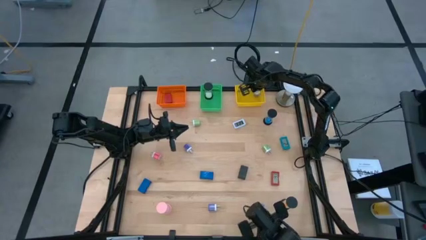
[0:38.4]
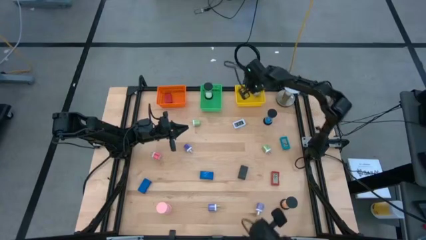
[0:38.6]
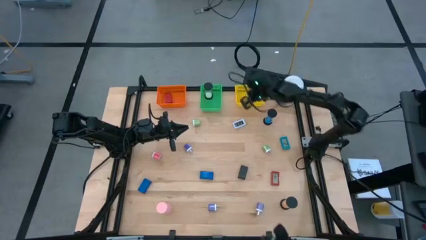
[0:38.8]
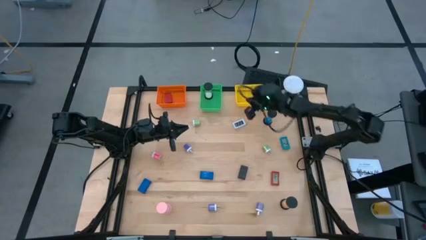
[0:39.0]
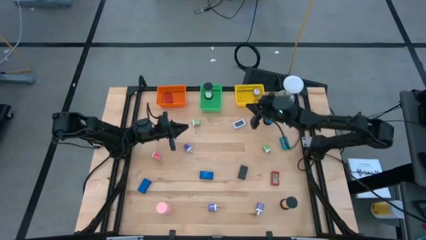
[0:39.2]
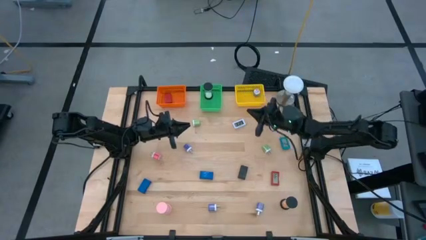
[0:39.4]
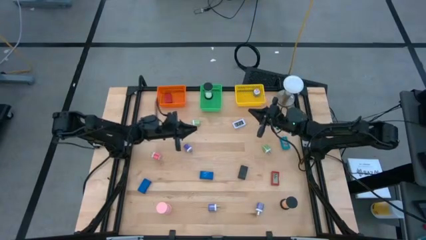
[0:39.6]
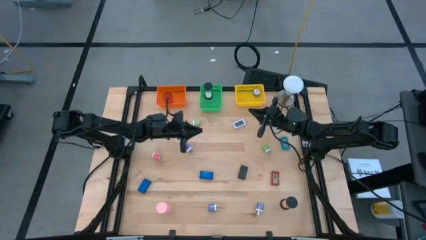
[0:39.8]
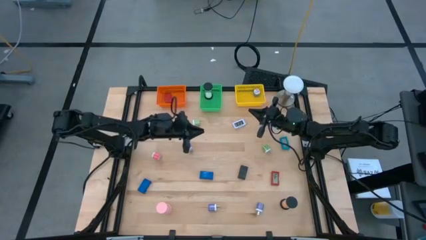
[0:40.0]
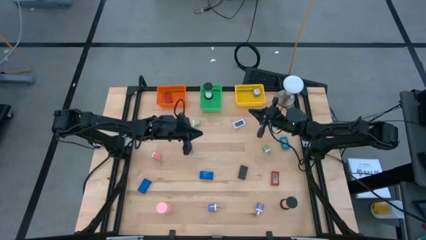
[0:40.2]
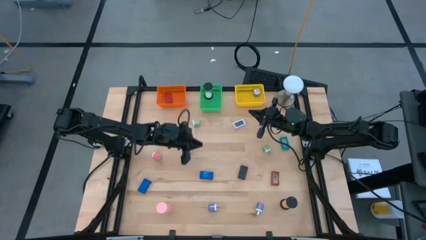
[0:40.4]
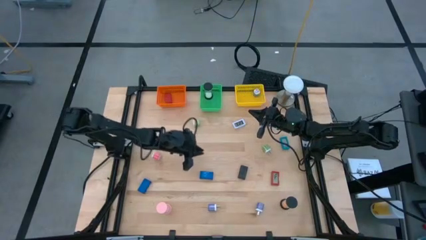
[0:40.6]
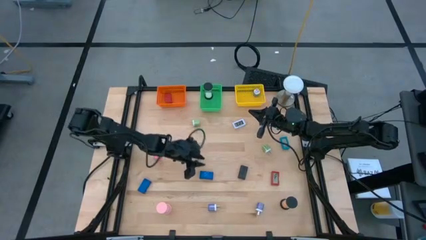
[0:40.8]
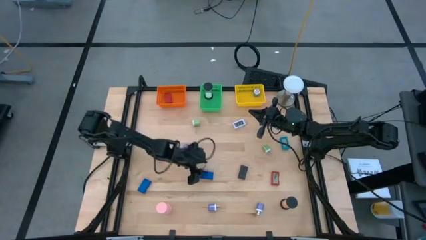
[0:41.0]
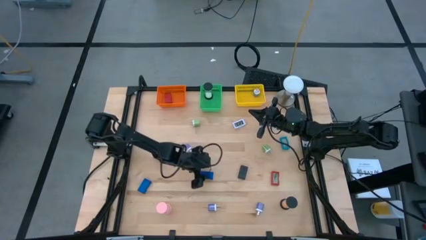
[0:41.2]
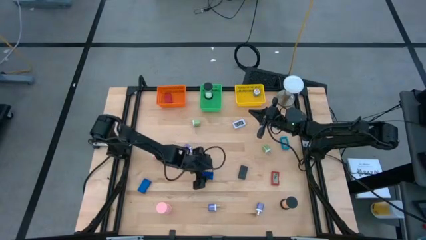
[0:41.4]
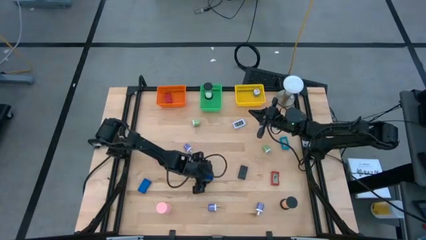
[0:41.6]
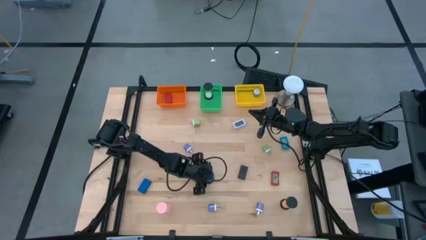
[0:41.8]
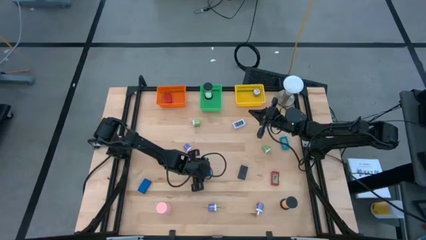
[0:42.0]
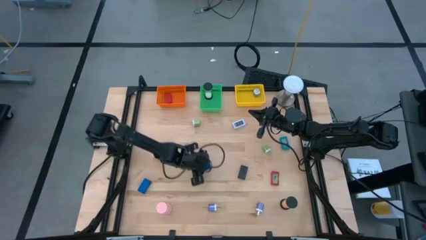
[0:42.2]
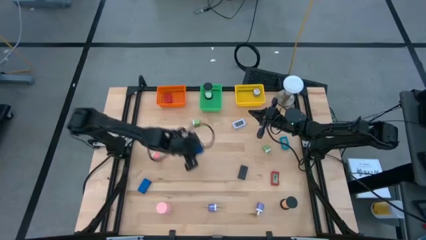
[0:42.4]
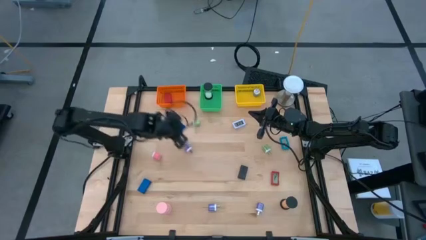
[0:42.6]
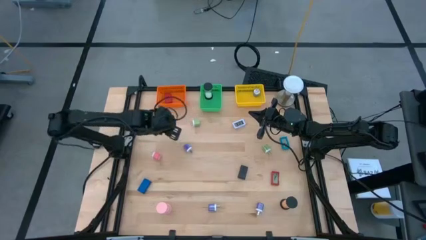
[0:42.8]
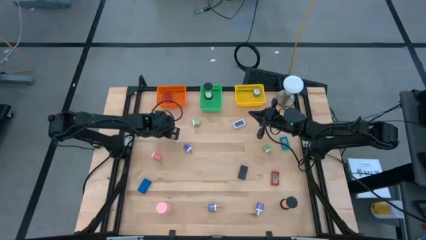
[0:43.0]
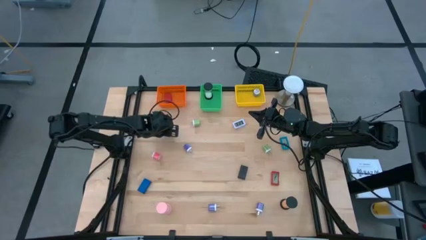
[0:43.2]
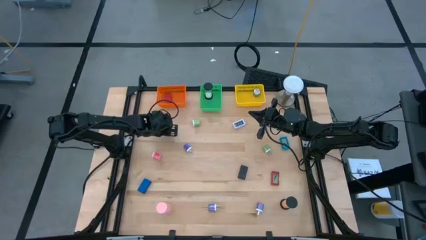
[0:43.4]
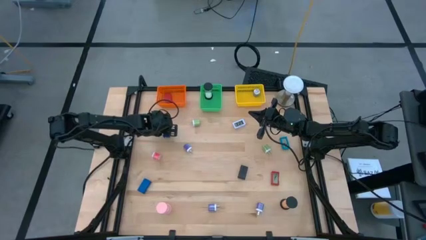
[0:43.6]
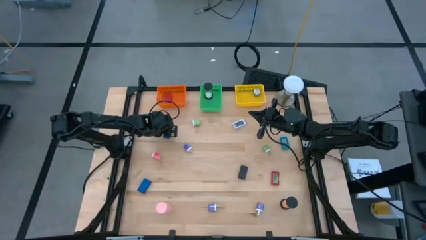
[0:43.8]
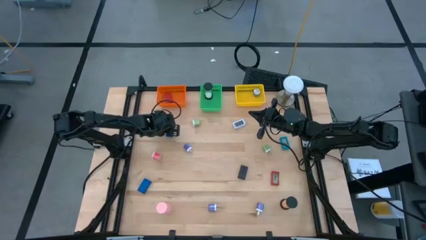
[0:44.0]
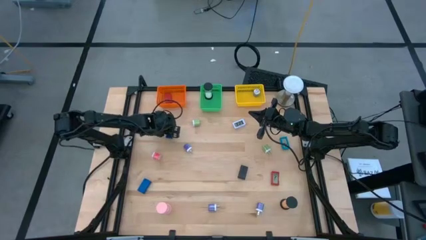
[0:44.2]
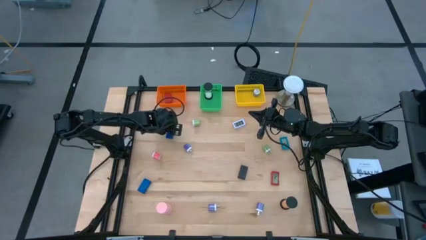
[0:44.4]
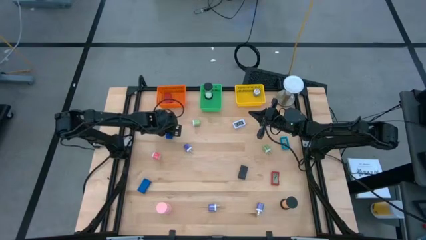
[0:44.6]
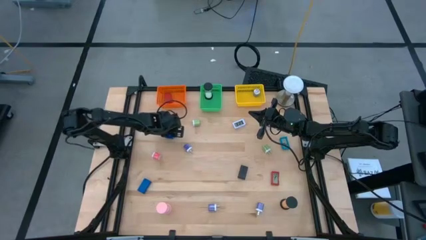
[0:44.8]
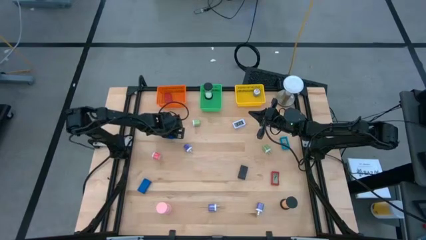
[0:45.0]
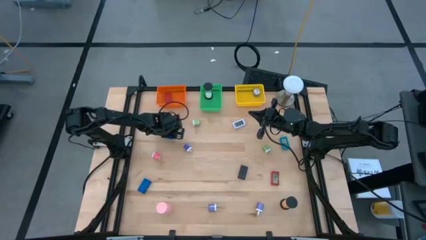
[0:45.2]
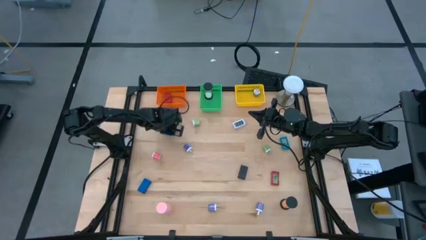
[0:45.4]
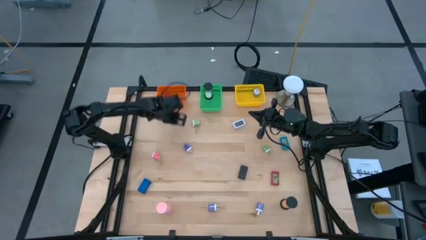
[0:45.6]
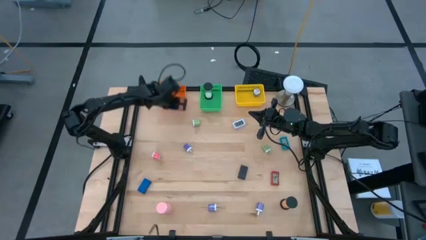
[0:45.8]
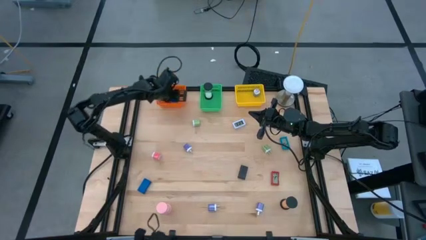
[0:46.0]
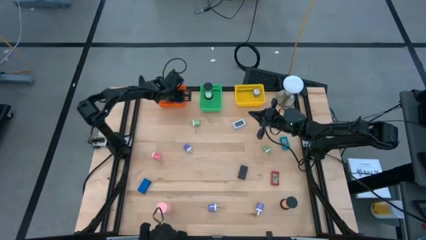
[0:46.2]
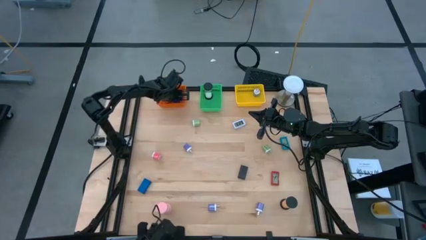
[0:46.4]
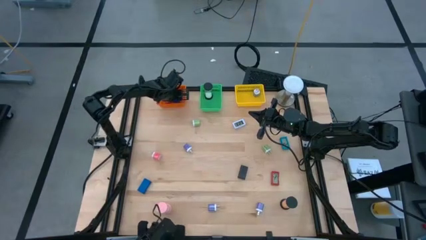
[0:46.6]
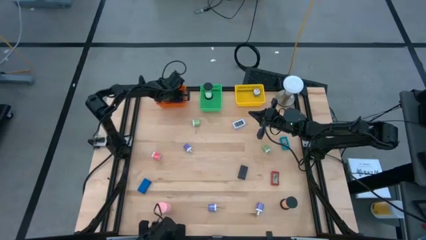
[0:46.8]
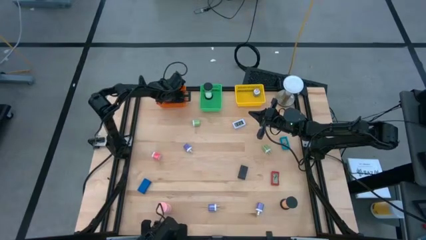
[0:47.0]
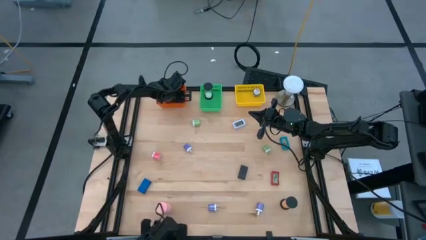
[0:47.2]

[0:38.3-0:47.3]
Task: Pick & Place Office items
Put the right blue digital clock into the orange bin

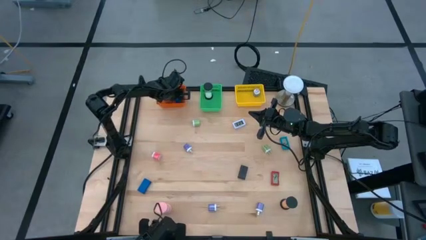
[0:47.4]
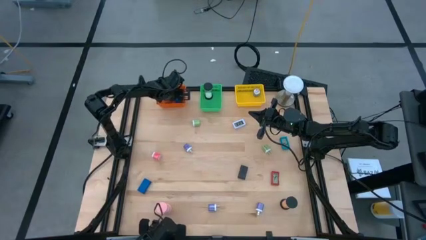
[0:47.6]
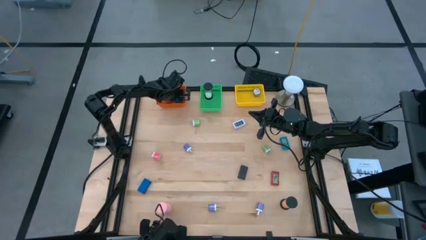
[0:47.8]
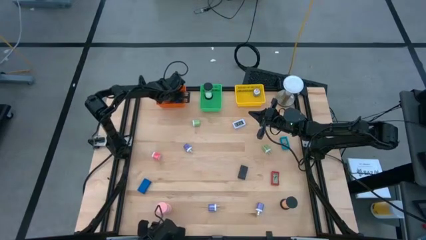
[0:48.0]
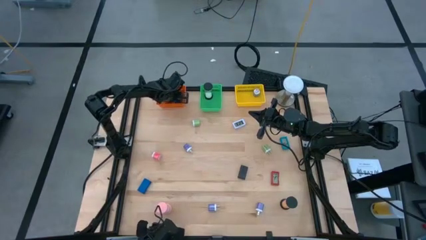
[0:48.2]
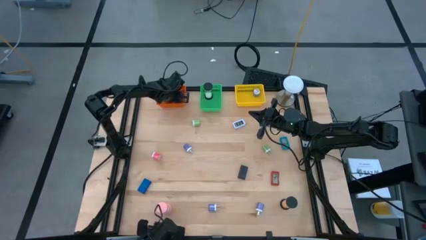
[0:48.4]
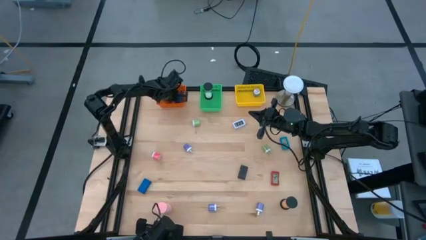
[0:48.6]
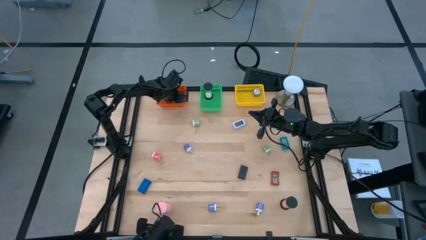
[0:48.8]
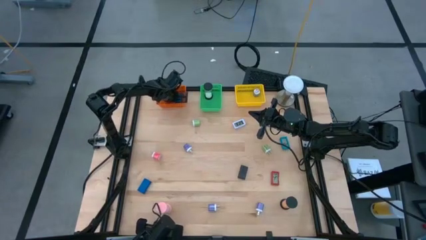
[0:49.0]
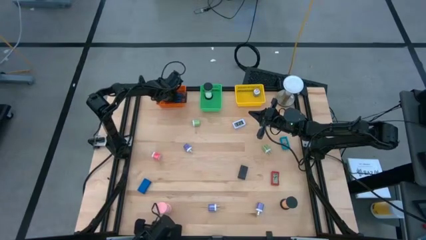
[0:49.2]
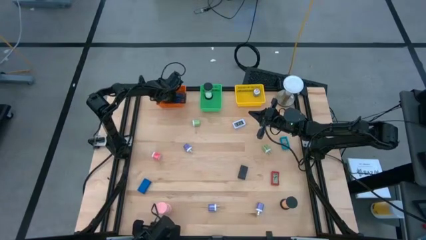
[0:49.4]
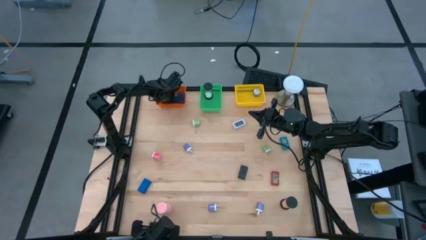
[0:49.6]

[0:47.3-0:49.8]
Adjust the red digital clock in the orange bin
